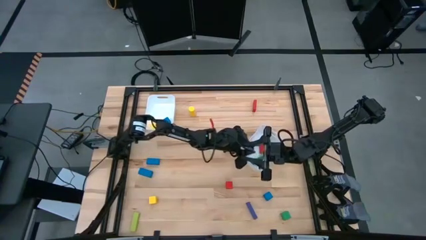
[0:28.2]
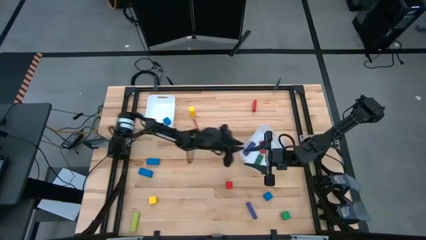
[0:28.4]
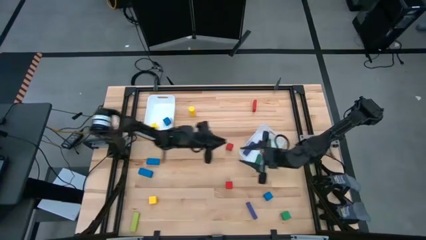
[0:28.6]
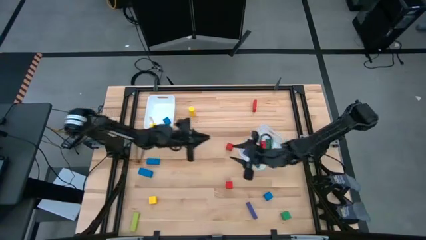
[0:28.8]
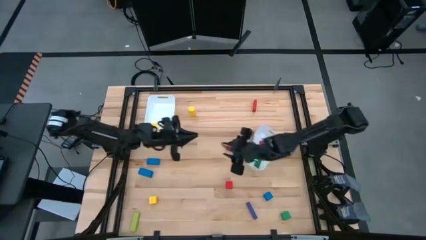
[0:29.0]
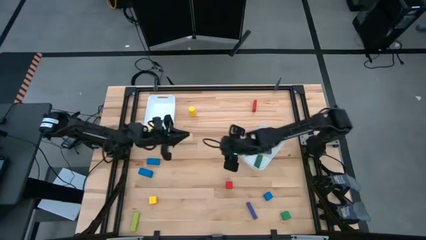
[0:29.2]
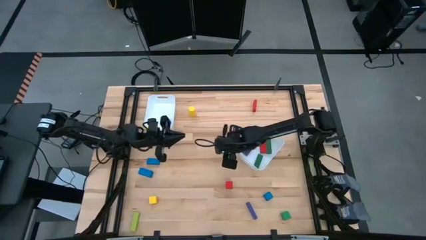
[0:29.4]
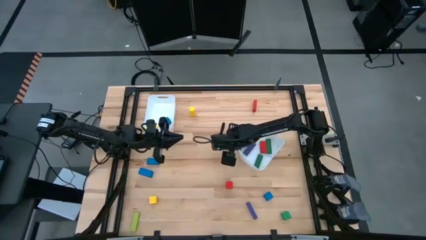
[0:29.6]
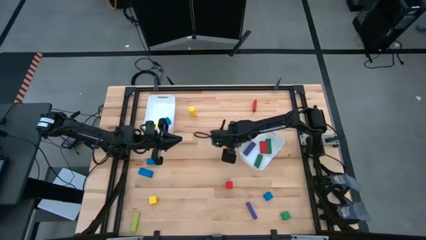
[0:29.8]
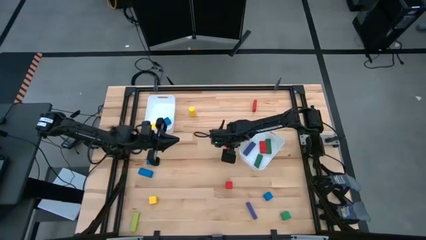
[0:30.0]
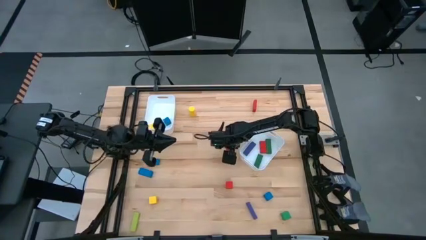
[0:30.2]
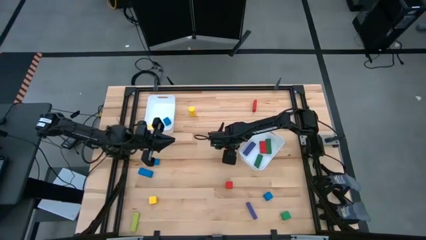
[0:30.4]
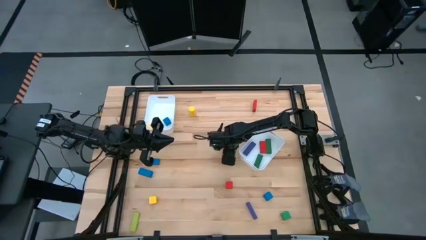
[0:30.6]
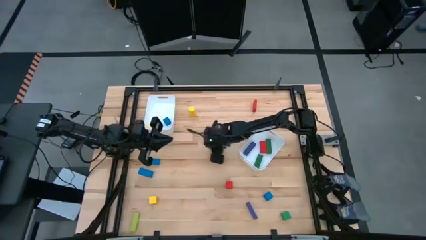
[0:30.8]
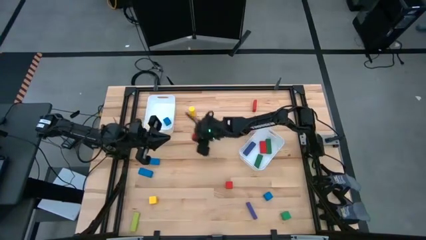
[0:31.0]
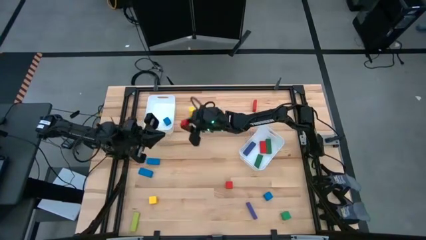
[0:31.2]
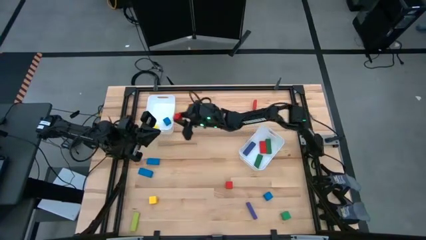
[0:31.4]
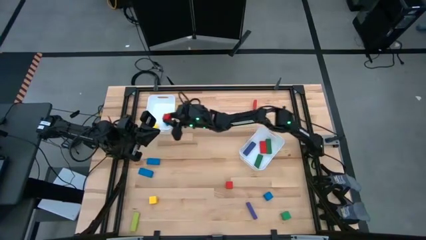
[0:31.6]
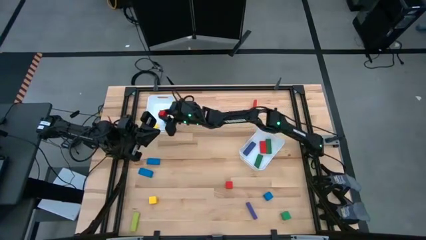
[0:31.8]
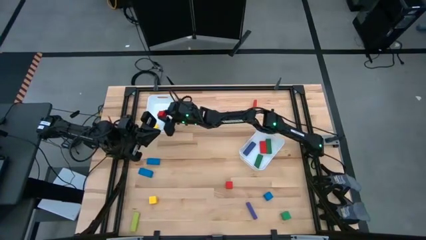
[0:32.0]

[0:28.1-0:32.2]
Task: Sort blocks by size
Put the top red square block into the left white bin

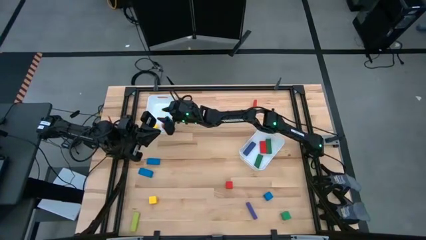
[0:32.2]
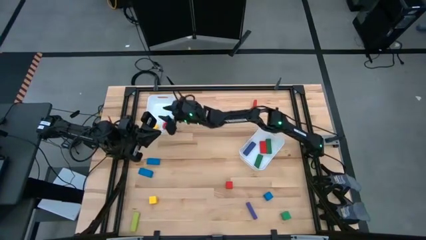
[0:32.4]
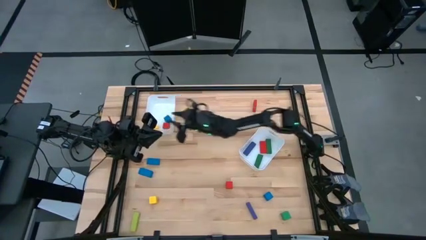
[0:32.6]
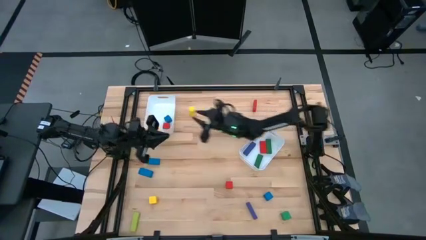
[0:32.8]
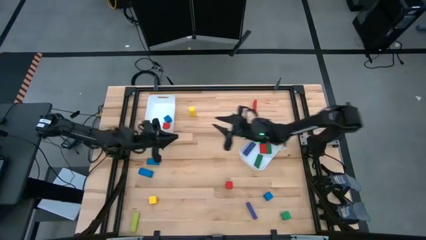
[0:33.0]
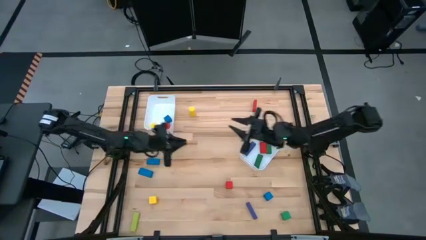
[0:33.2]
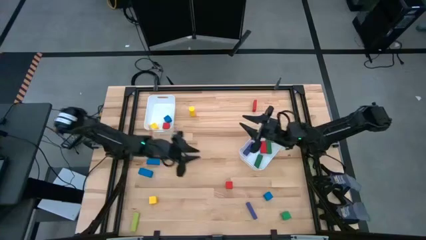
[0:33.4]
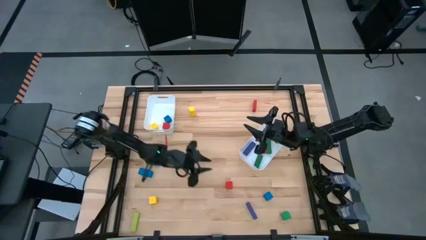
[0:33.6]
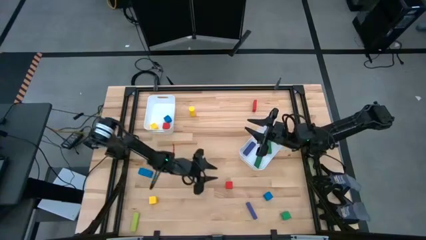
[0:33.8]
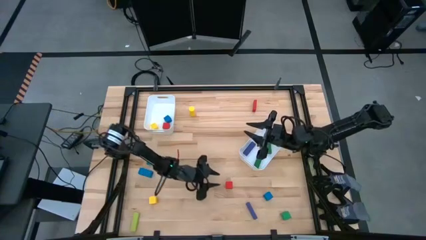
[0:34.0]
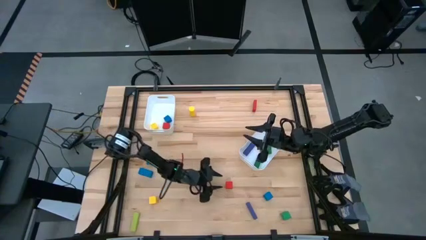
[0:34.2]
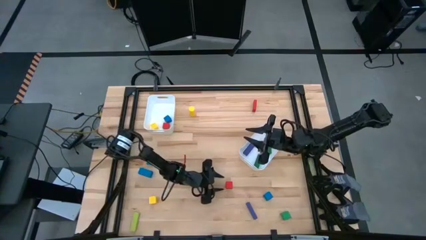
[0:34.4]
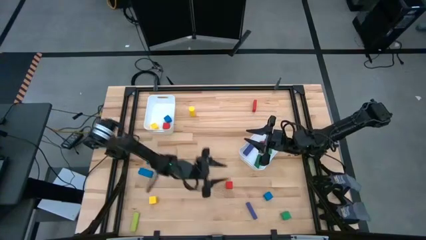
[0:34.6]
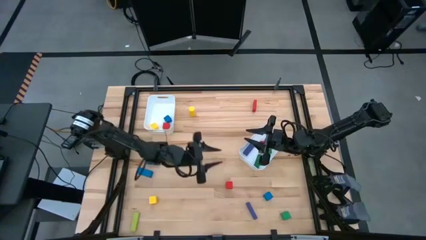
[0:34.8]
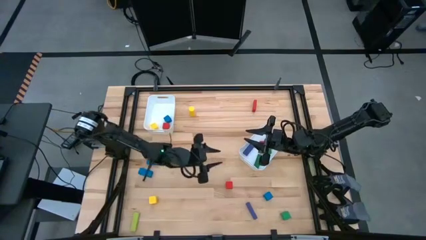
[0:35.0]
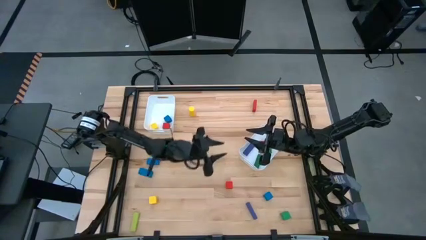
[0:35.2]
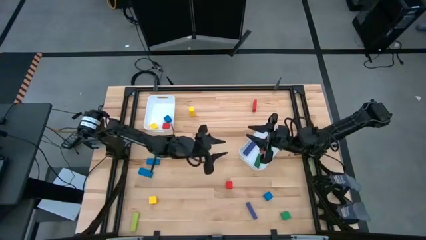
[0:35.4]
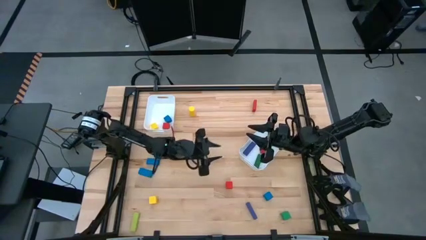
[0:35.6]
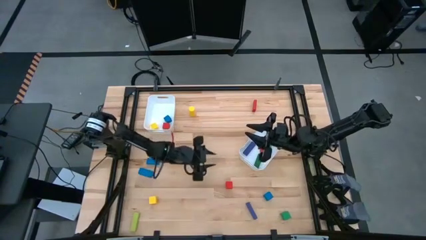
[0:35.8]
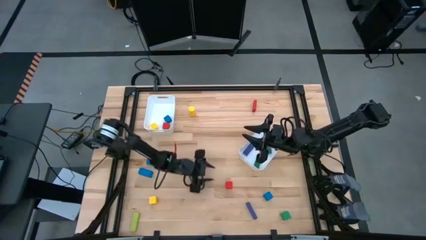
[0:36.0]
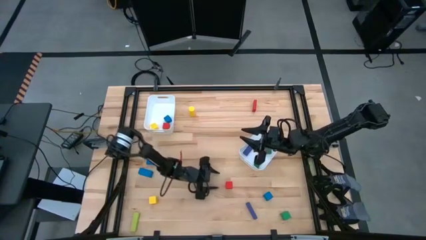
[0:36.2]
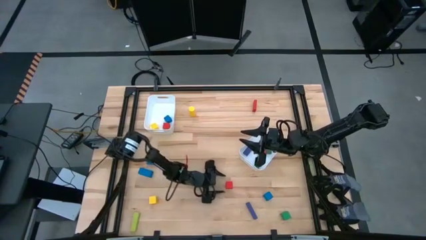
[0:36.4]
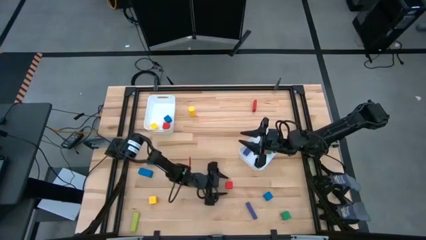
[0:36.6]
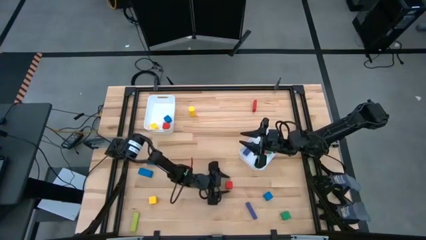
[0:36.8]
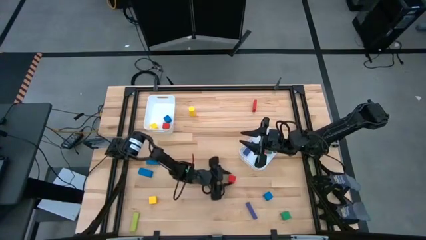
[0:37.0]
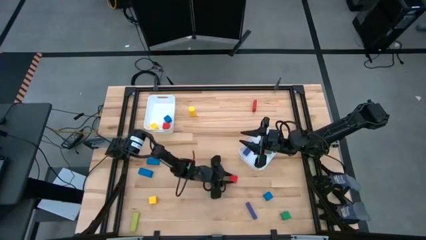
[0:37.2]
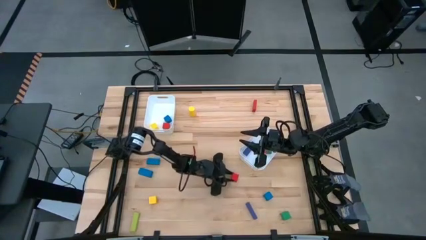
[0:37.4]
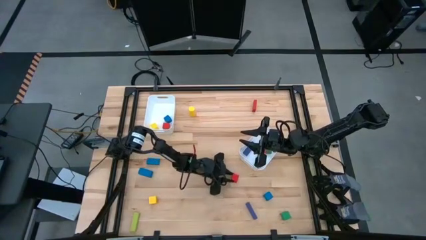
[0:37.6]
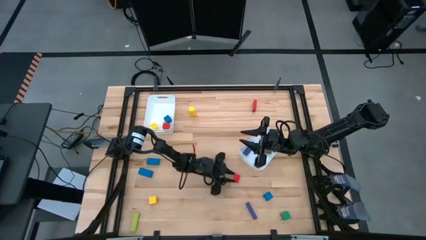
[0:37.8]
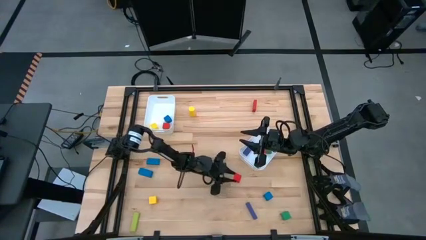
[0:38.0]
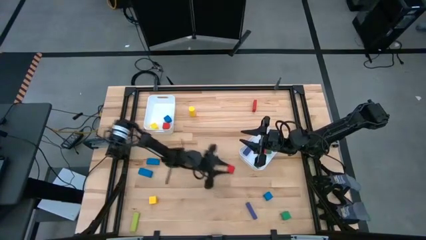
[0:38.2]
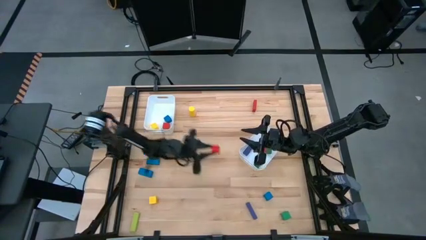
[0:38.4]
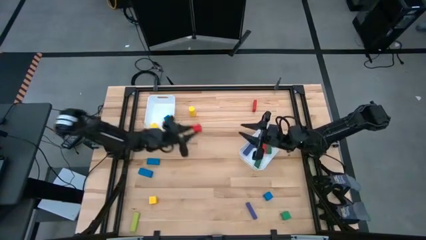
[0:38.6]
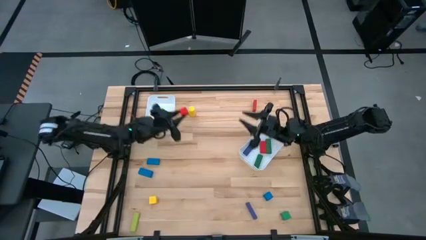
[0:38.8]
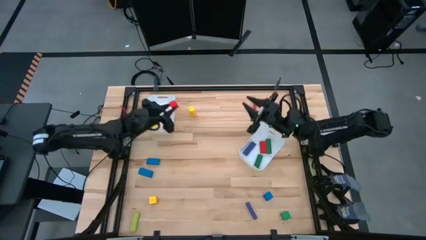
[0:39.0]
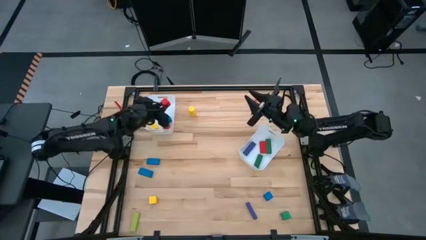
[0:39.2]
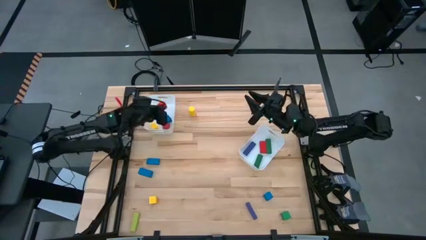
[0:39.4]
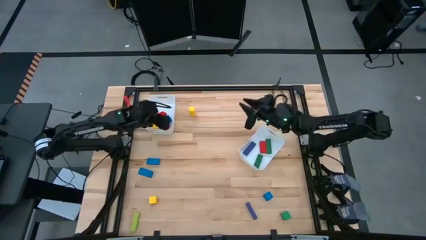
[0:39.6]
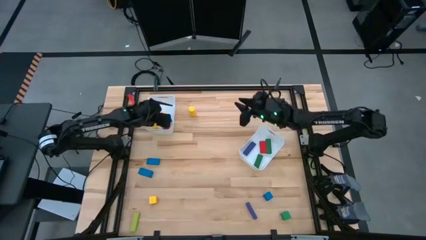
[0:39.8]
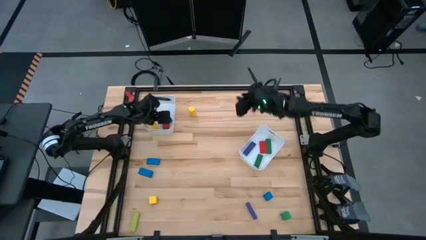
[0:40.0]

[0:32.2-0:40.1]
Put the red square block into the left white bin

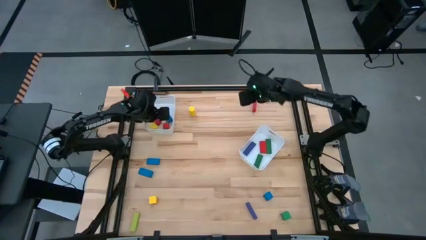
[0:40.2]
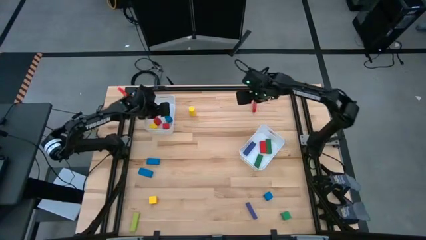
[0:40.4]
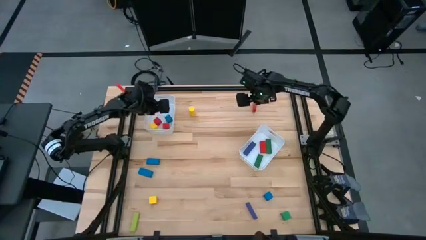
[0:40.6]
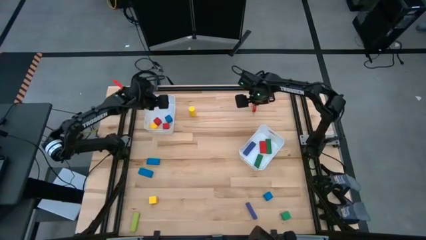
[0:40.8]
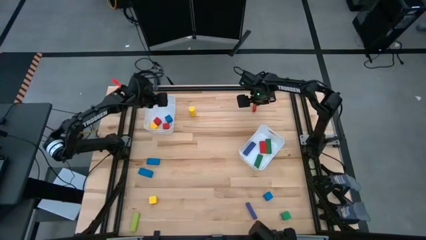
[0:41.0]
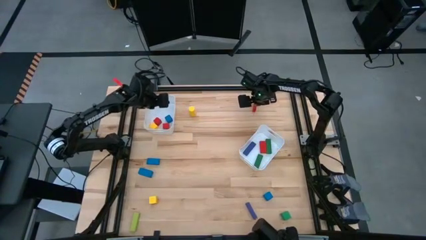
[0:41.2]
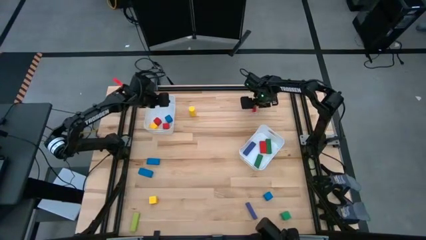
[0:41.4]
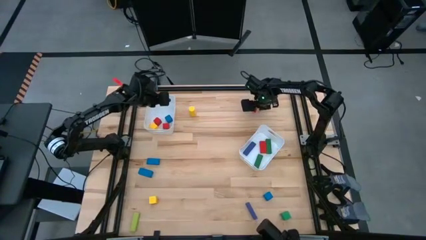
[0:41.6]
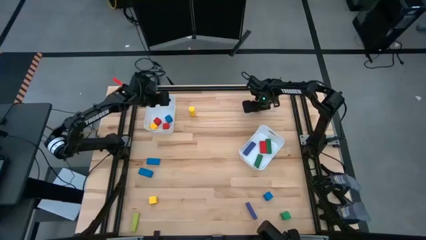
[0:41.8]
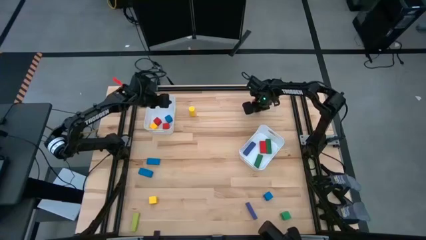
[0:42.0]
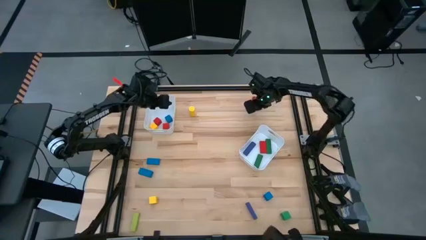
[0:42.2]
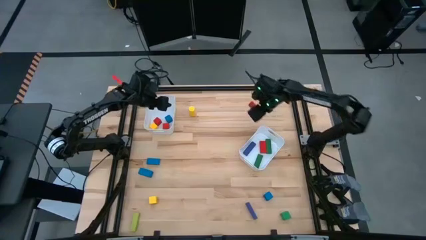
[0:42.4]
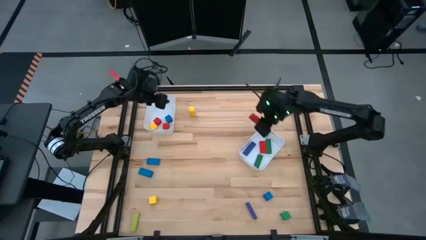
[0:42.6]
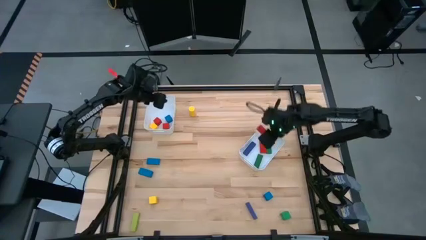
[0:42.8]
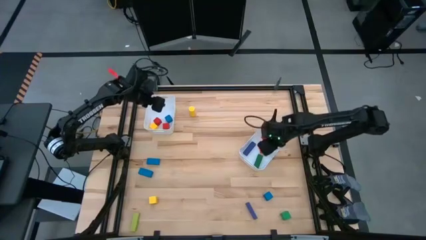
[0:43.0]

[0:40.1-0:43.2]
Put the red rectangle block into the right white bin

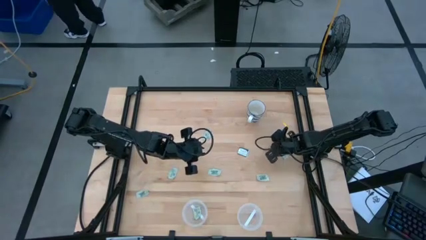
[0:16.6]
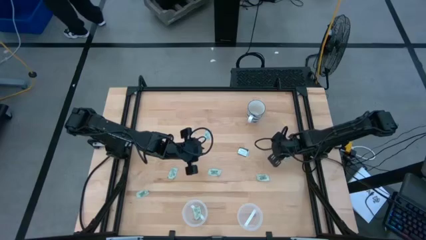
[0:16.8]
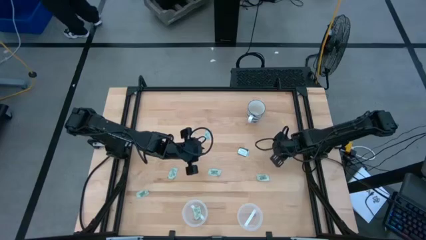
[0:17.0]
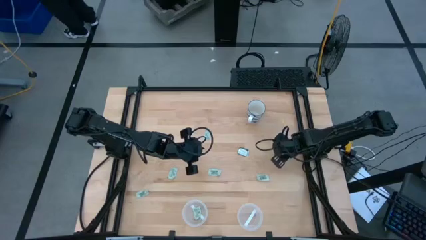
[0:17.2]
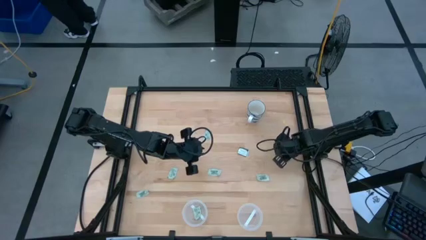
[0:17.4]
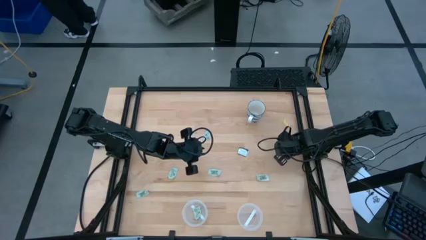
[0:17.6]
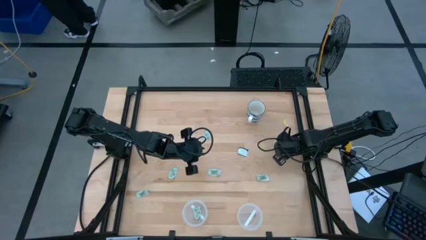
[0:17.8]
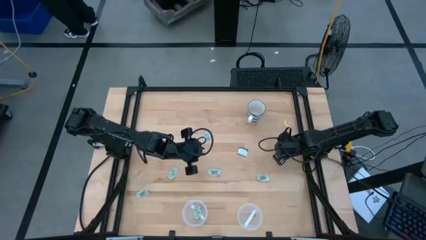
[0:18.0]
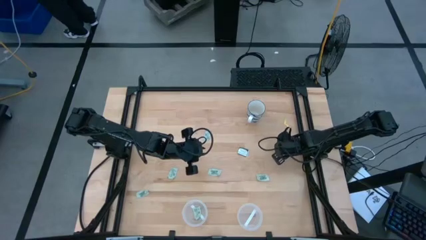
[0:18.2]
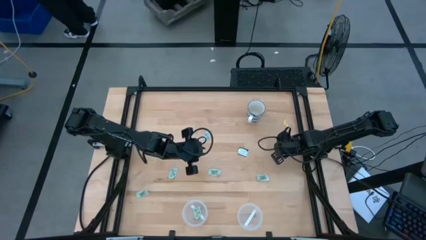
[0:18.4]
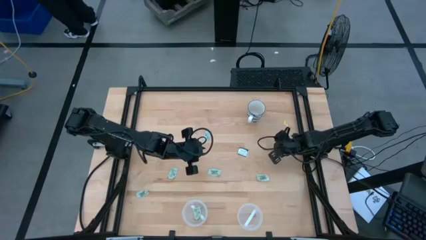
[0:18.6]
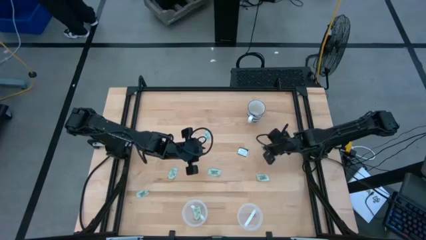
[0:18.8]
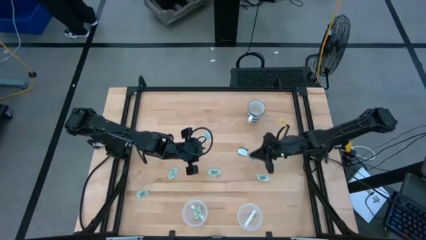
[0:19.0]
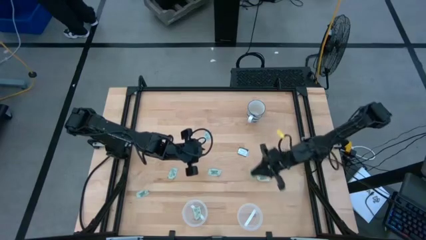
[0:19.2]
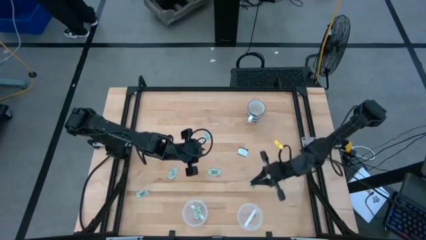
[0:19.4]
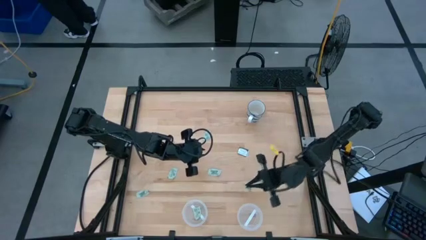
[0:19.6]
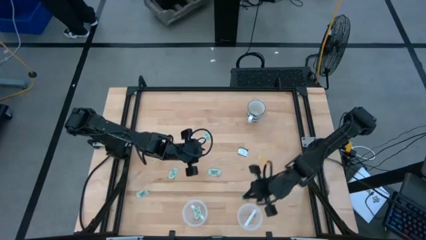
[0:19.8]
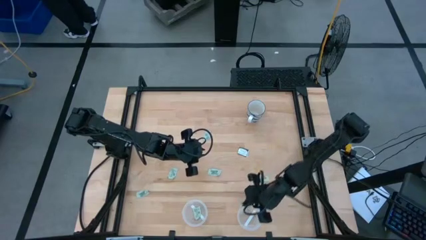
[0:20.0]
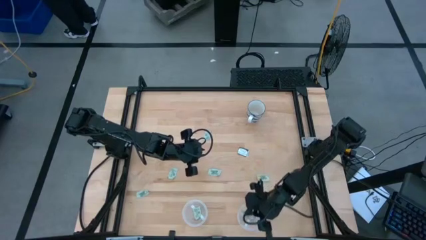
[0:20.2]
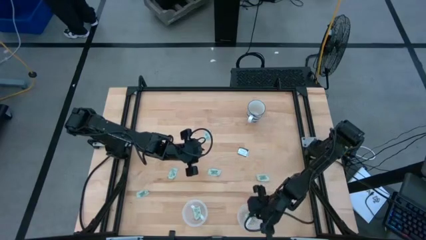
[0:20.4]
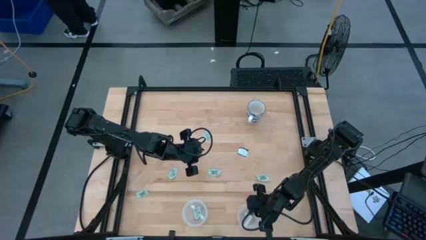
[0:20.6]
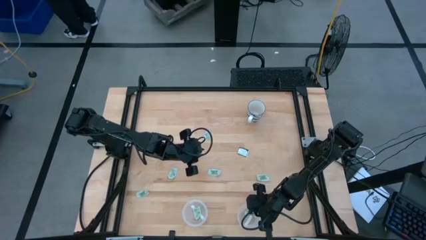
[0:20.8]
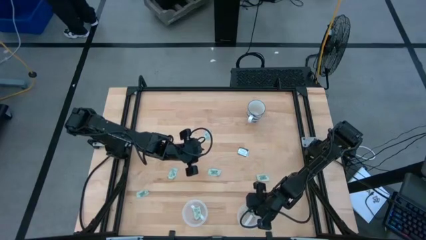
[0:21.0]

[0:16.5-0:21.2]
Task: Pick and place Stevia / Truvia into bins
Put the white stevia packet into the right transparent container
